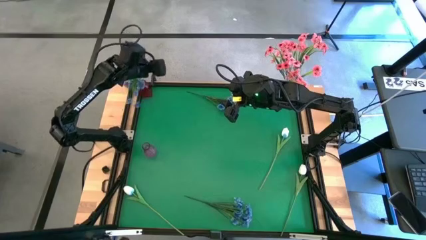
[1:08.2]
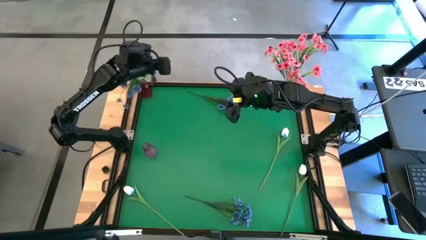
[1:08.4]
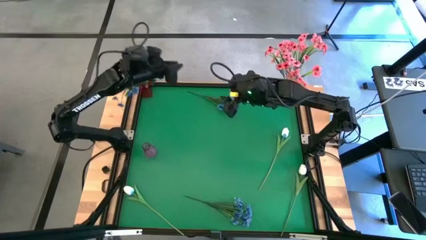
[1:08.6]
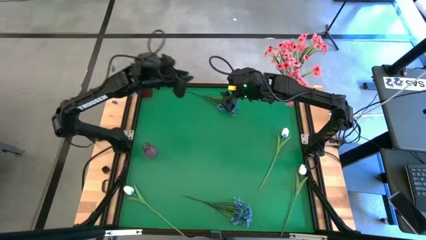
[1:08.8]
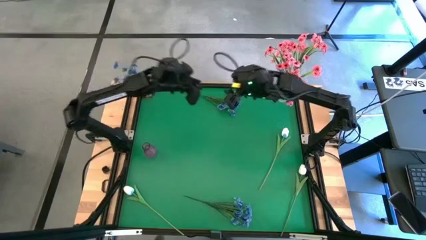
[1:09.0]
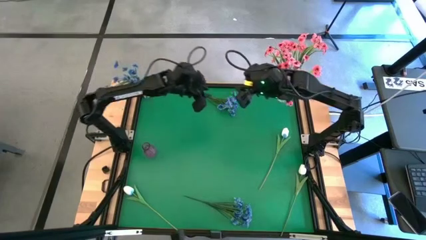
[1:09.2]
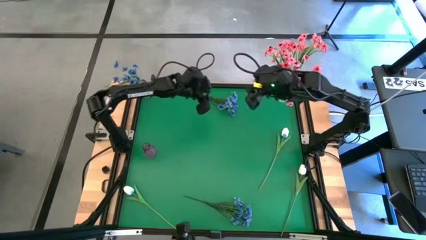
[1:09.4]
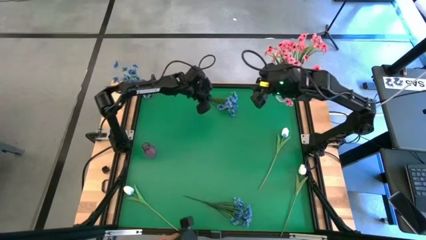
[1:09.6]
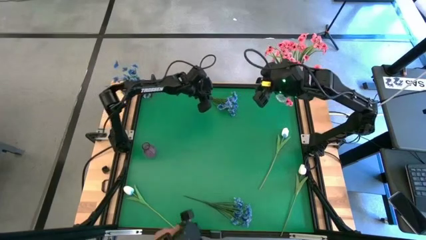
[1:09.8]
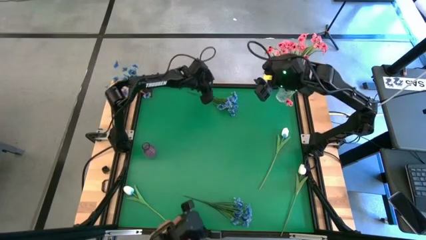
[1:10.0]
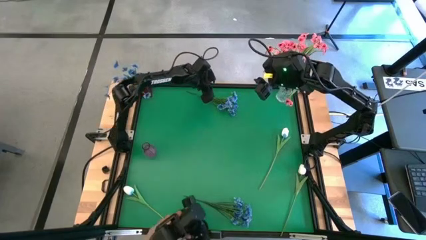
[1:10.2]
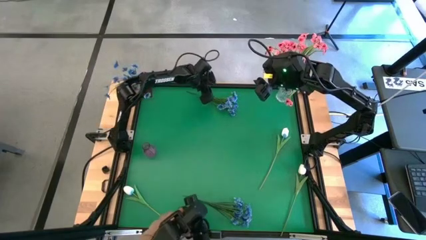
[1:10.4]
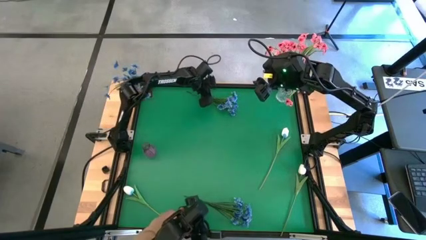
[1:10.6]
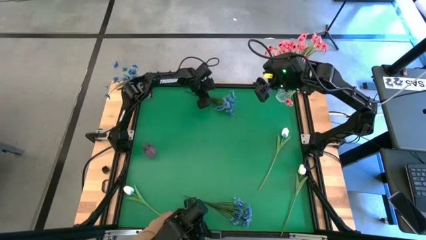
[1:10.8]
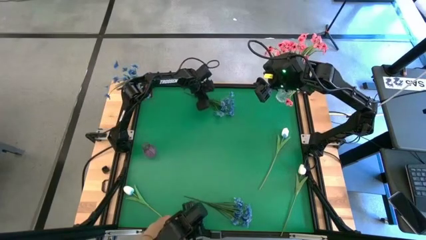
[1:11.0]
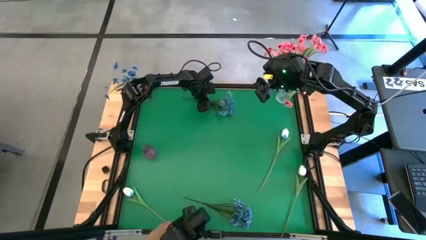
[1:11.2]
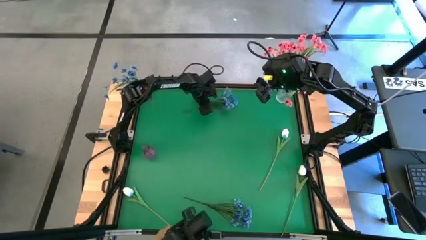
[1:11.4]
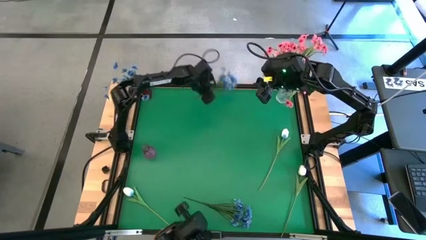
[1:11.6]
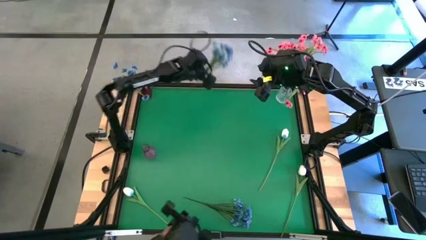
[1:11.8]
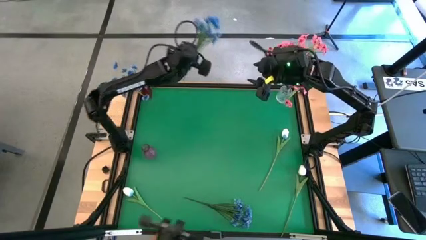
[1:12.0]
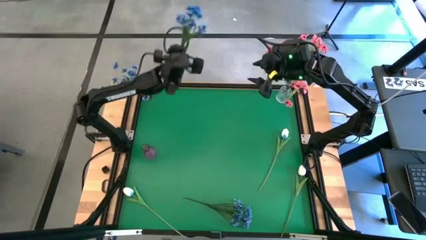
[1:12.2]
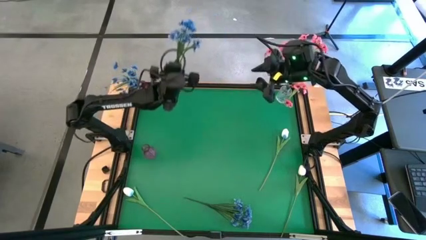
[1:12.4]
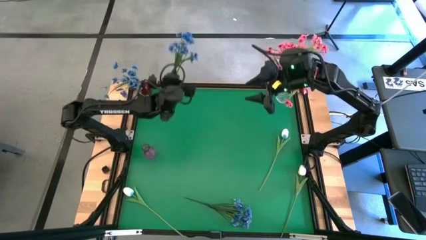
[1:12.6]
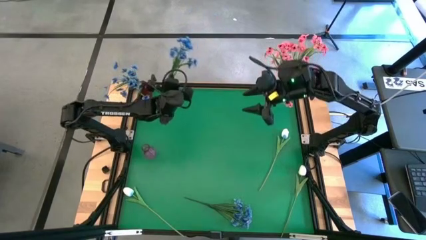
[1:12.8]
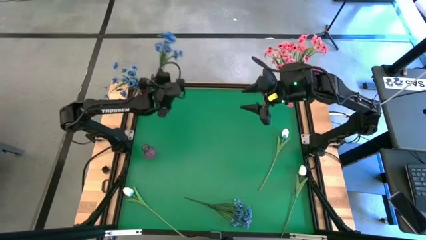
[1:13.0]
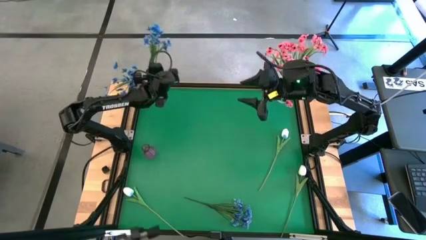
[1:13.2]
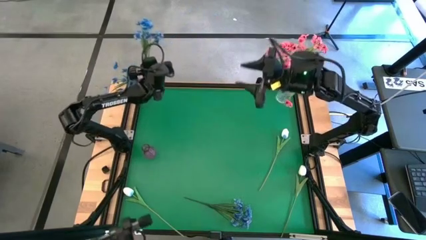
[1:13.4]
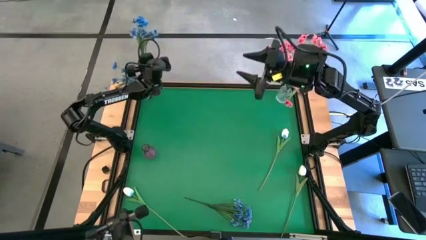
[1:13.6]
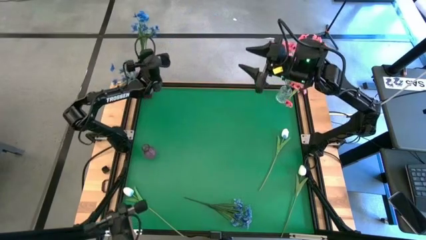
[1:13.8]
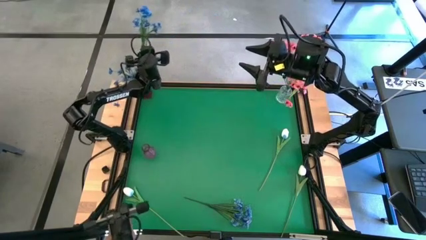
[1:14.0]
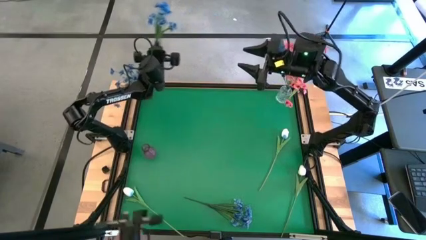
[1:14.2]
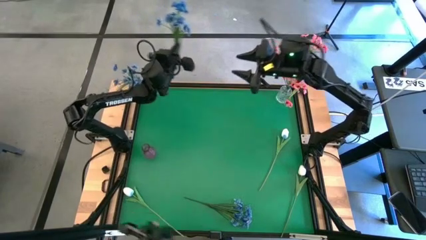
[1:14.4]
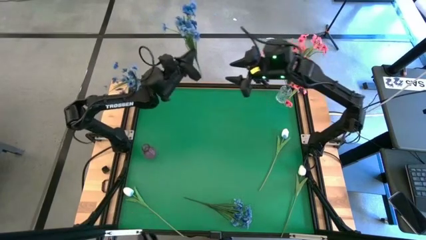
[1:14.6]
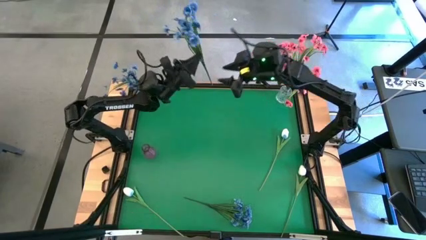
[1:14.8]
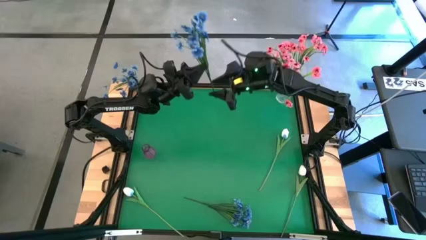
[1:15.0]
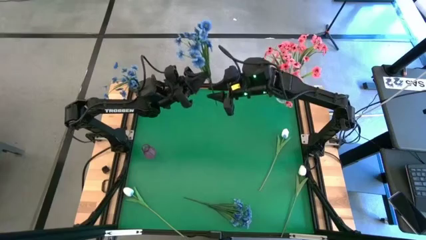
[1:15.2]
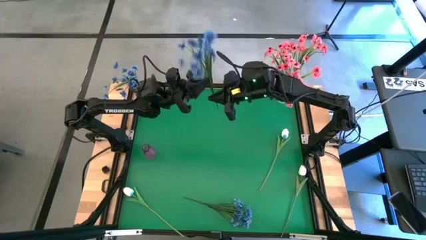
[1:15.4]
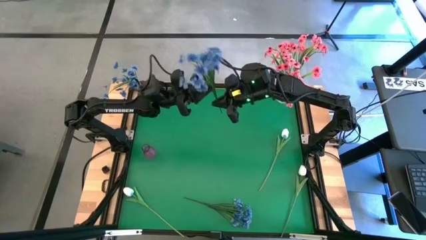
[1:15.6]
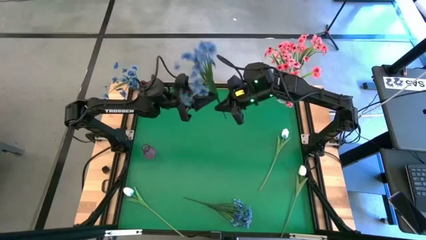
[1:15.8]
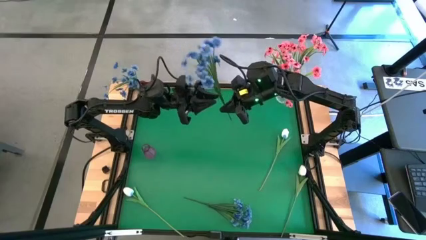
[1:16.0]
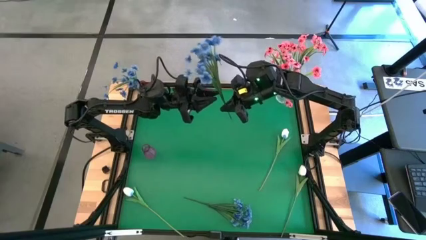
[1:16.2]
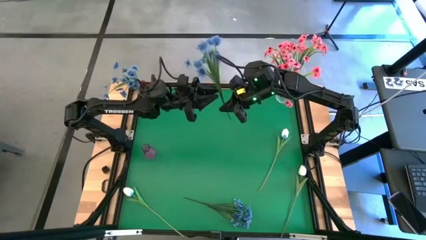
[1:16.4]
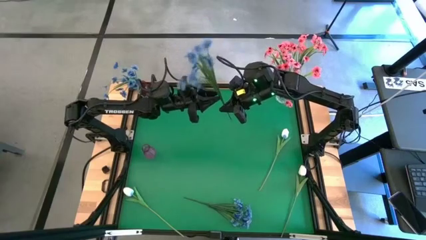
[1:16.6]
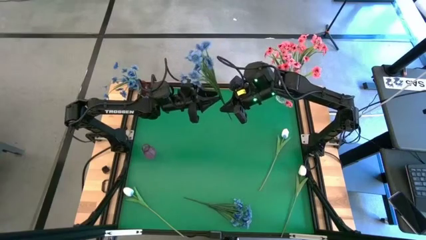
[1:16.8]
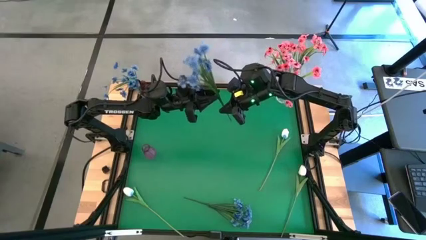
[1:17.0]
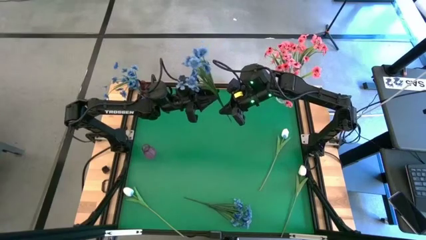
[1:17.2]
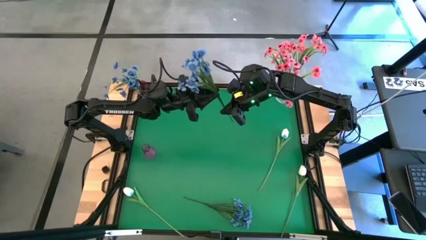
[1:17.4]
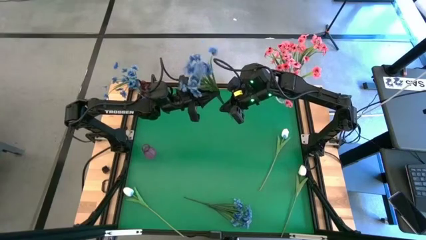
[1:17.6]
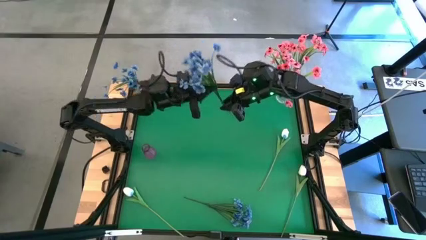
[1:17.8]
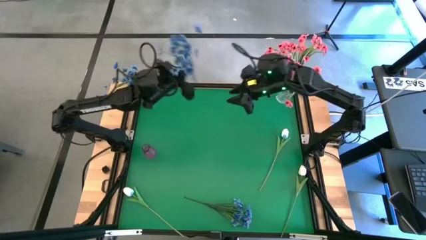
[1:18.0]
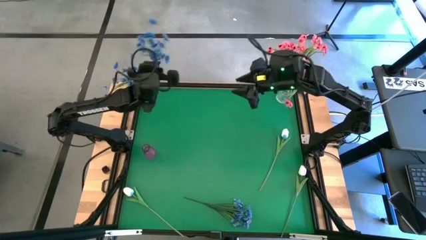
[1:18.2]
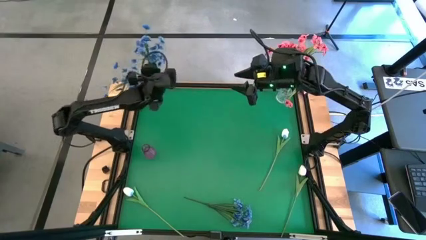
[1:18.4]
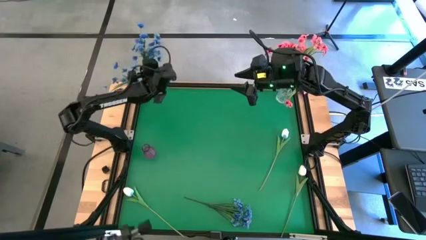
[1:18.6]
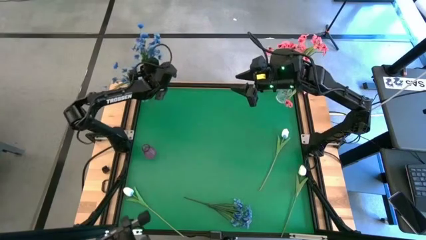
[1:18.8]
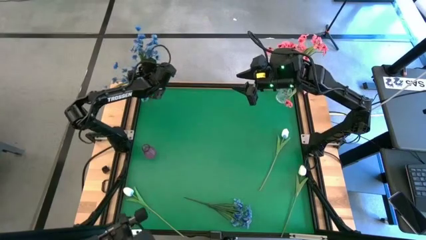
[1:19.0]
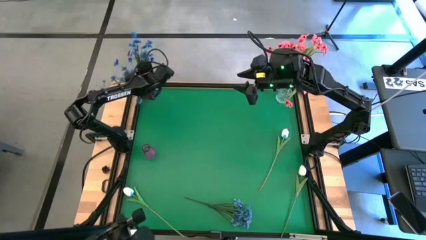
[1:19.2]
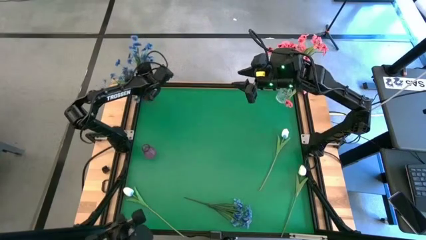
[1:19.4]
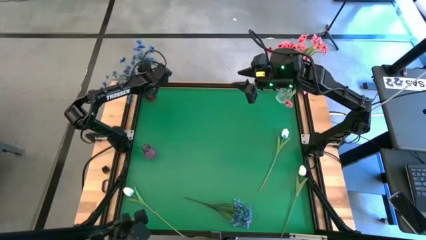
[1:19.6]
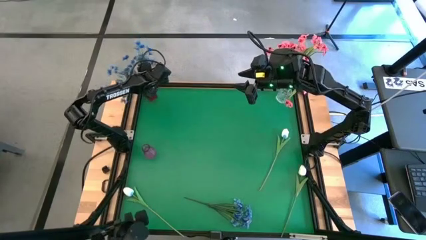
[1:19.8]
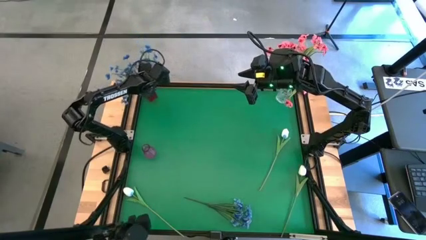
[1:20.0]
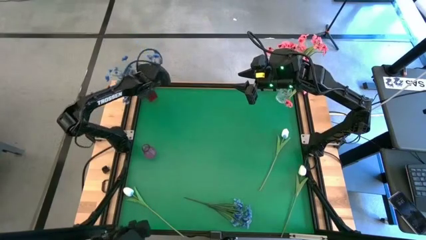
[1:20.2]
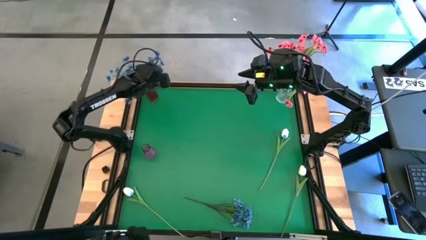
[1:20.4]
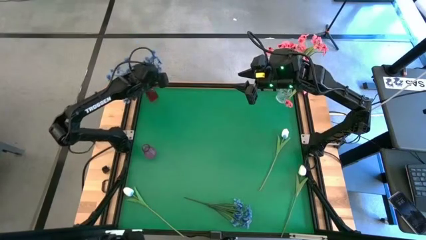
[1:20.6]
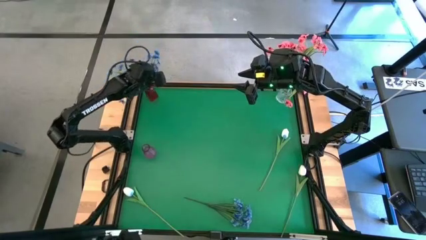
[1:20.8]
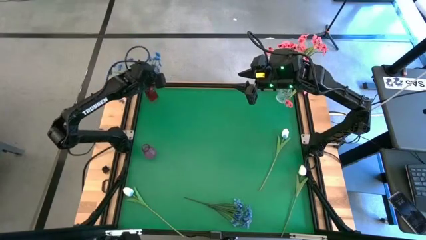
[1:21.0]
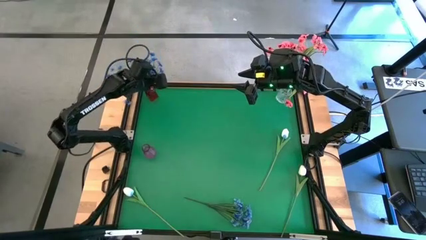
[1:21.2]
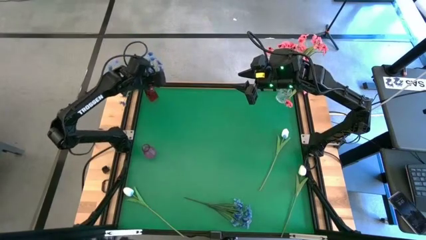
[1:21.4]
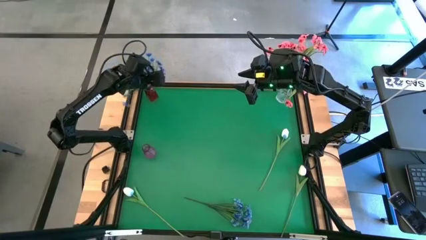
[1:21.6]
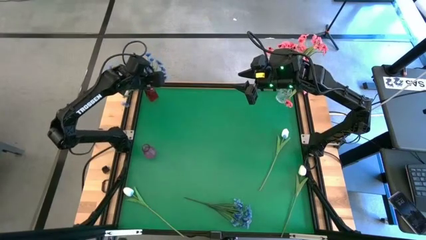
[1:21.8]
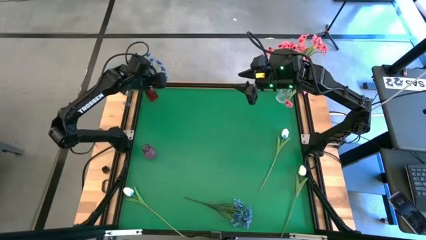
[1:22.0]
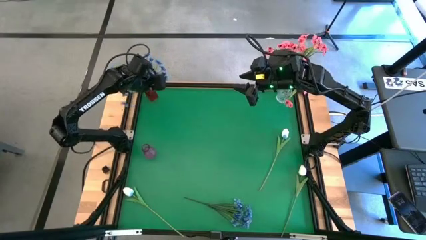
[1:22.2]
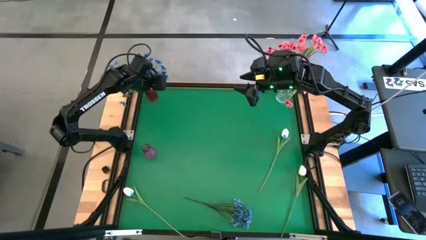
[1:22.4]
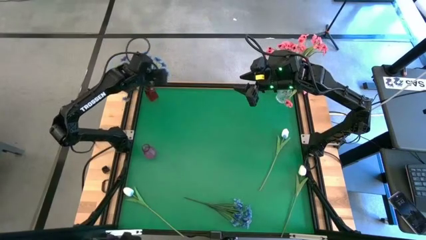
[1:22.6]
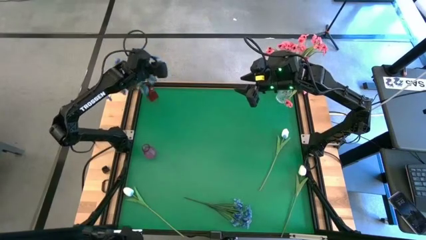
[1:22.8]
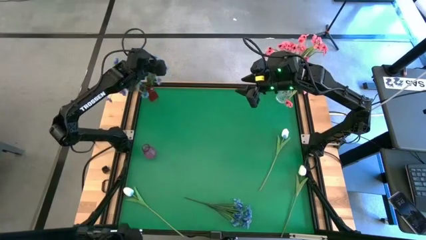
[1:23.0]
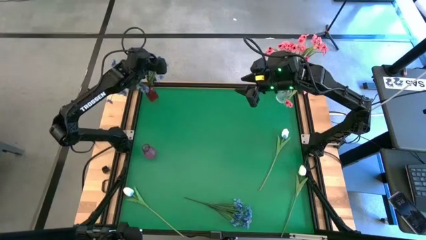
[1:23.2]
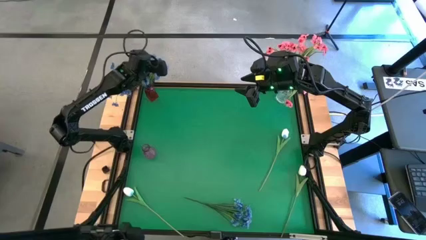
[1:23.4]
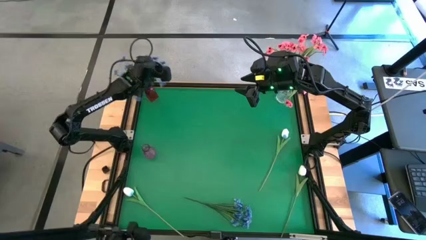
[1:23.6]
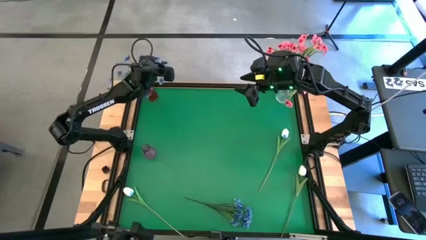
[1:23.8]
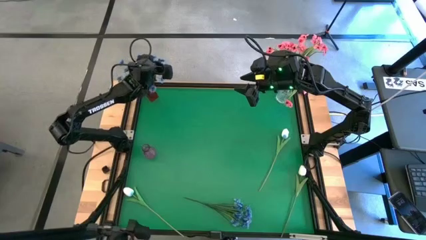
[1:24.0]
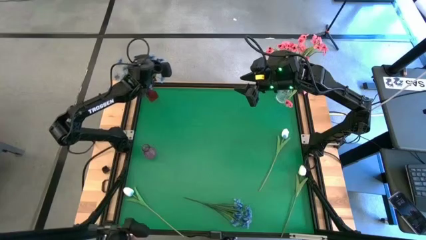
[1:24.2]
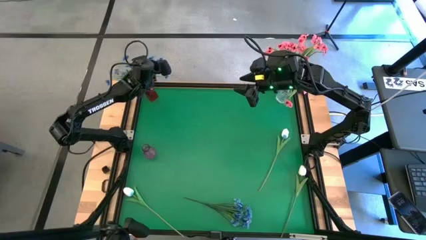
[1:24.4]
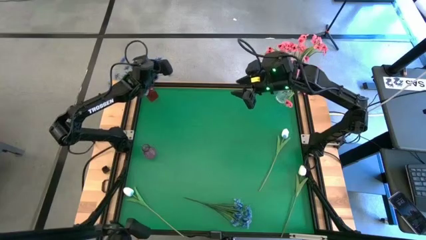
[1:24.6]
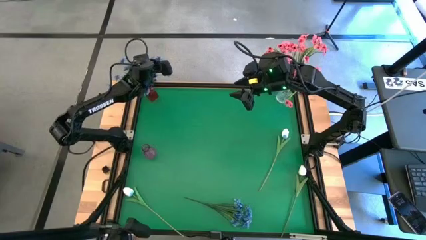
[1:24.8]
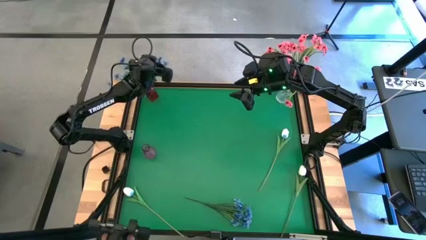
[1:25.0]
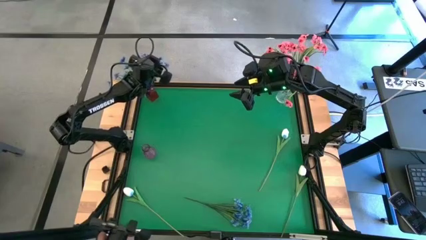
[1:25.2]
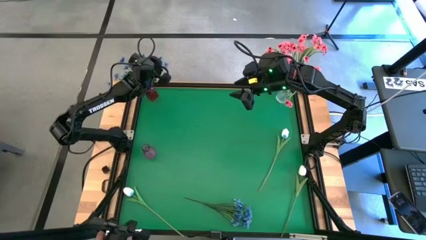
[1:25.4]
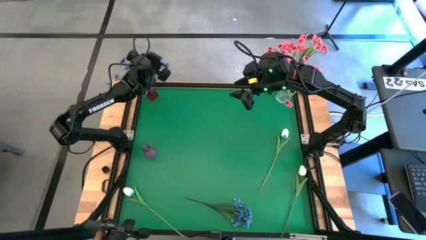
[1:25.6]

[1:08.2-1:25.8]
Task: Sort flowers into vase by color
Put the top blue flowers into the red vase
